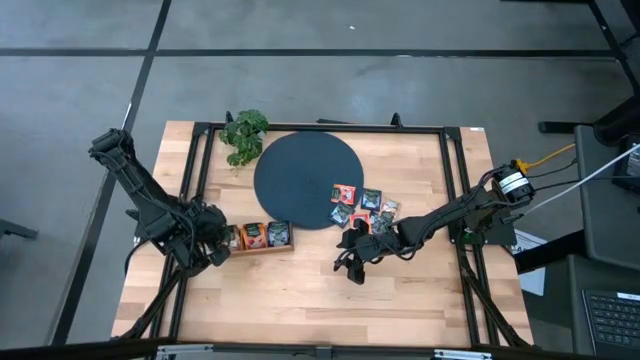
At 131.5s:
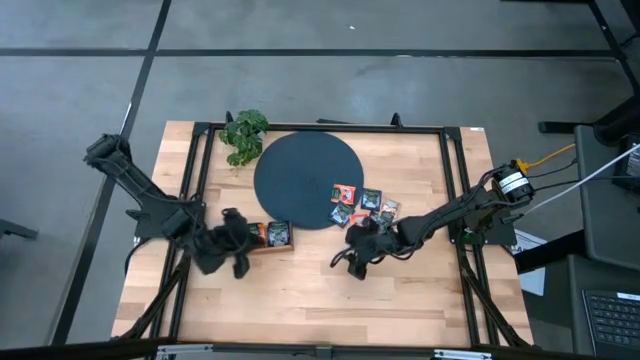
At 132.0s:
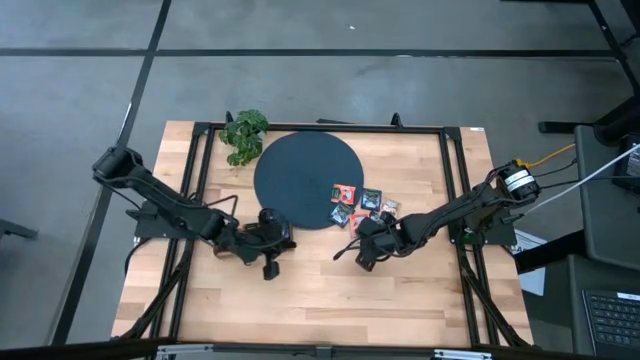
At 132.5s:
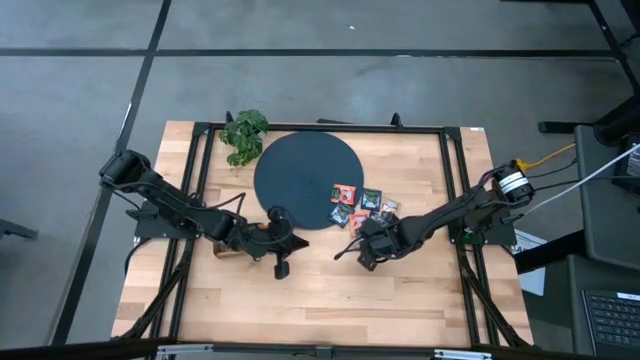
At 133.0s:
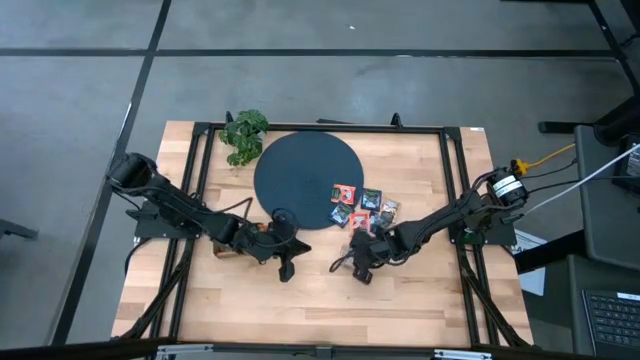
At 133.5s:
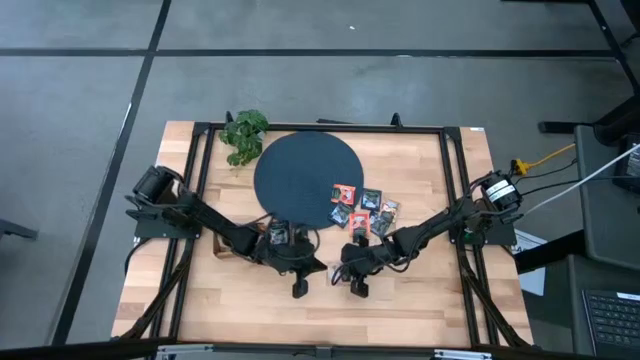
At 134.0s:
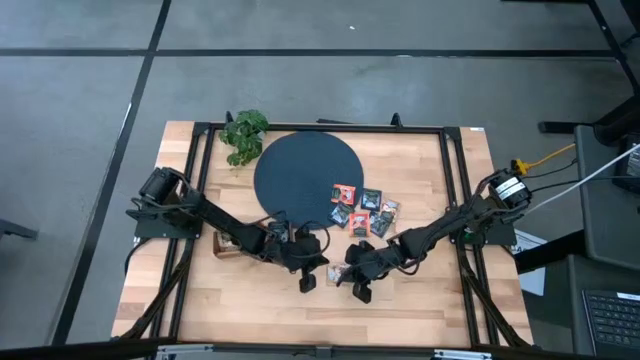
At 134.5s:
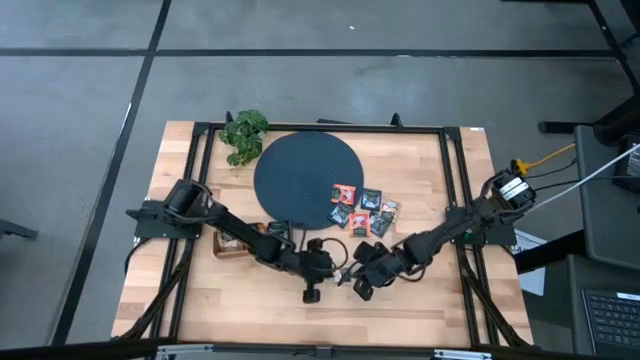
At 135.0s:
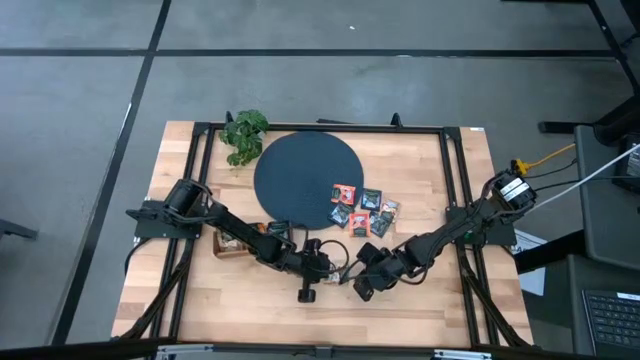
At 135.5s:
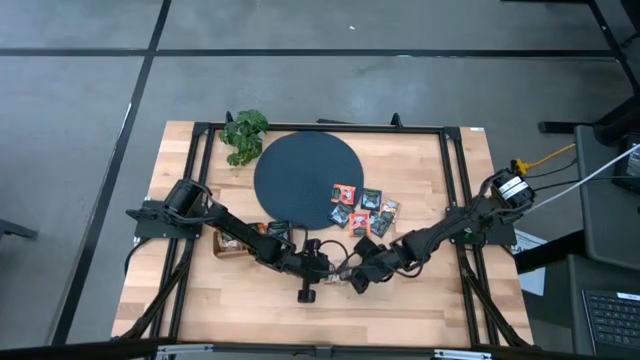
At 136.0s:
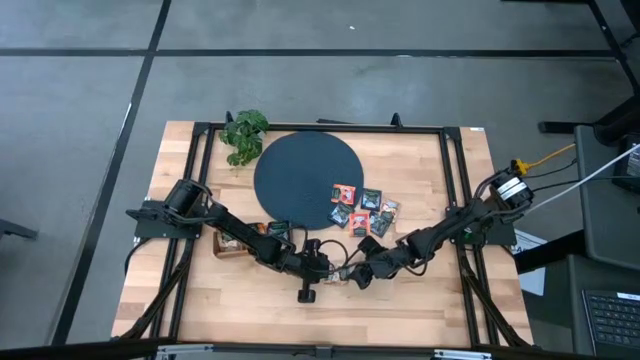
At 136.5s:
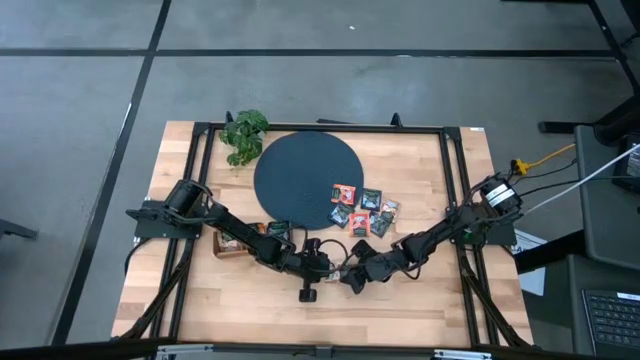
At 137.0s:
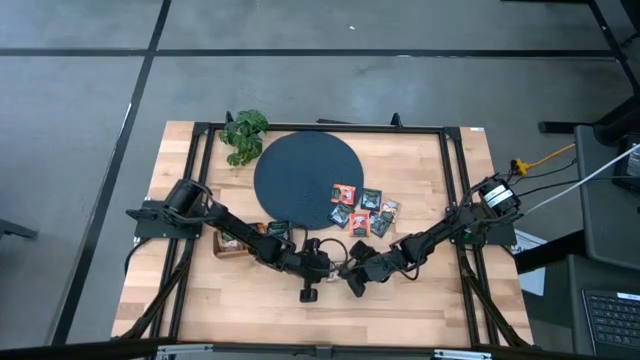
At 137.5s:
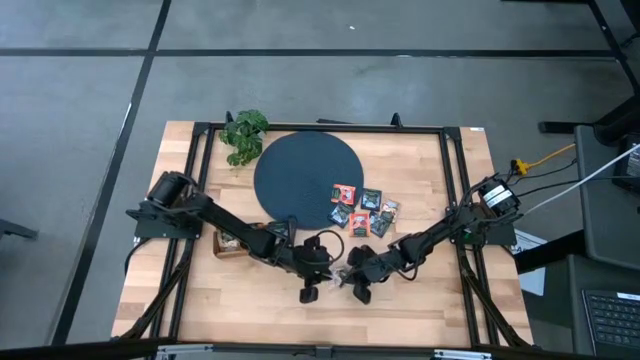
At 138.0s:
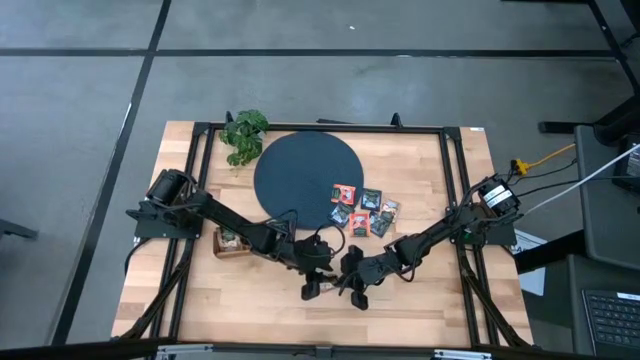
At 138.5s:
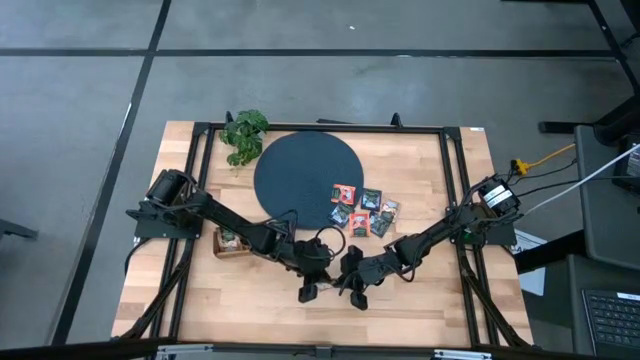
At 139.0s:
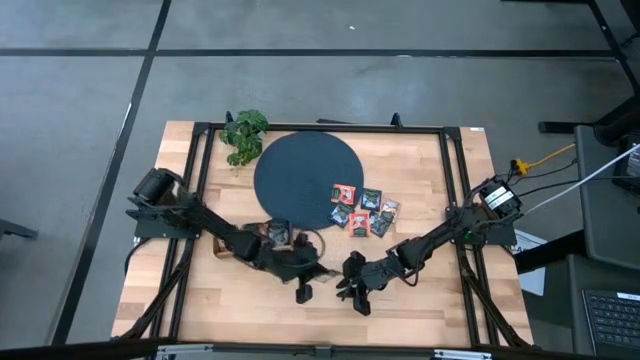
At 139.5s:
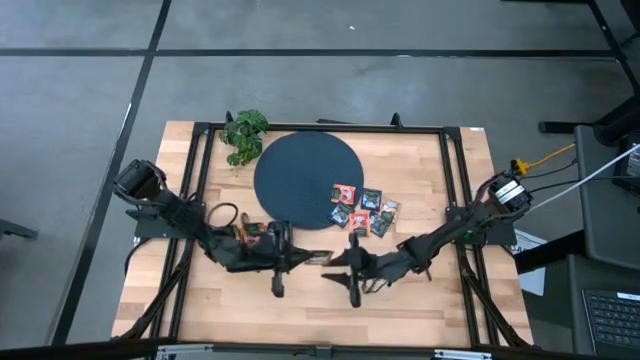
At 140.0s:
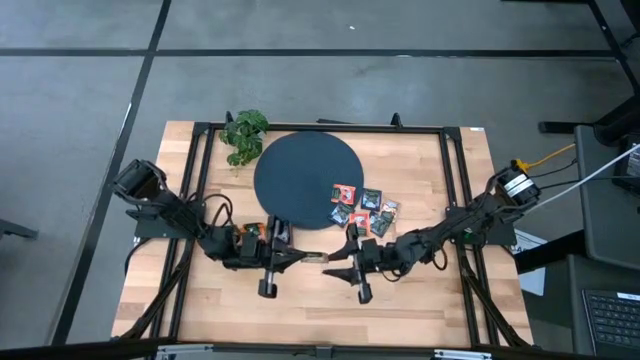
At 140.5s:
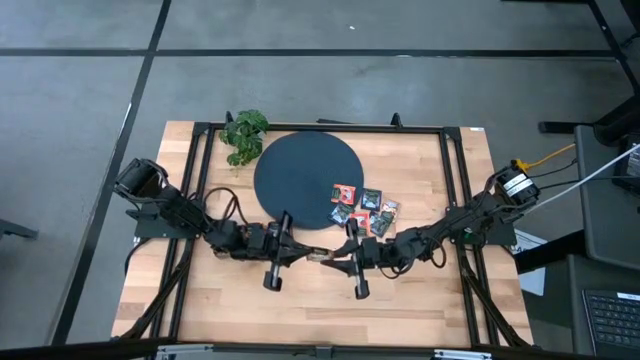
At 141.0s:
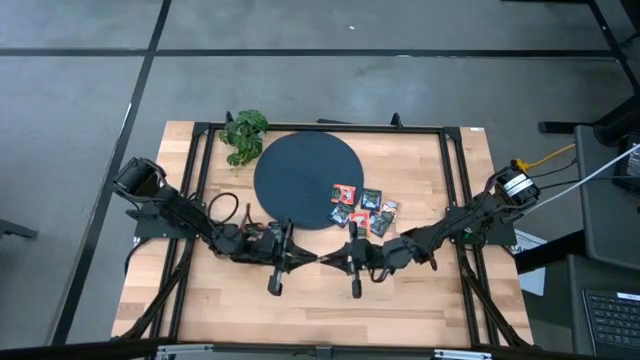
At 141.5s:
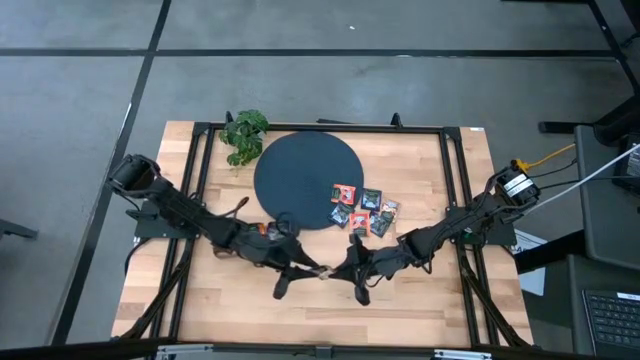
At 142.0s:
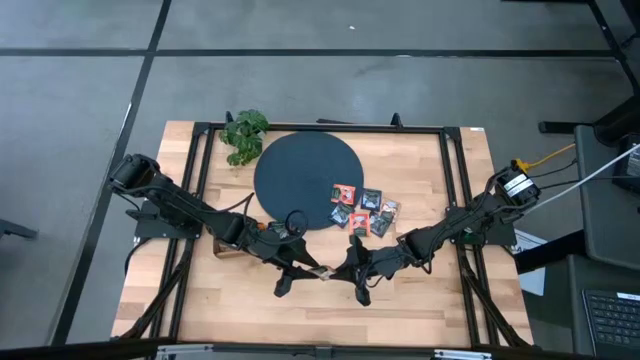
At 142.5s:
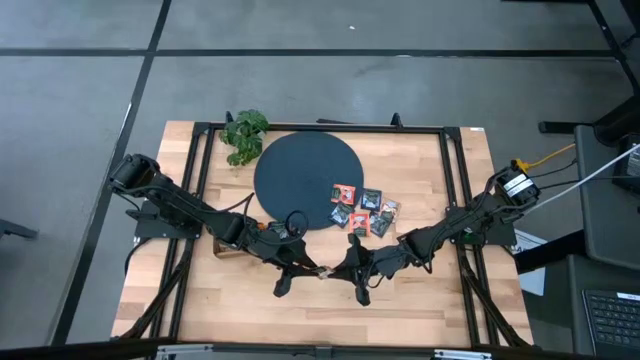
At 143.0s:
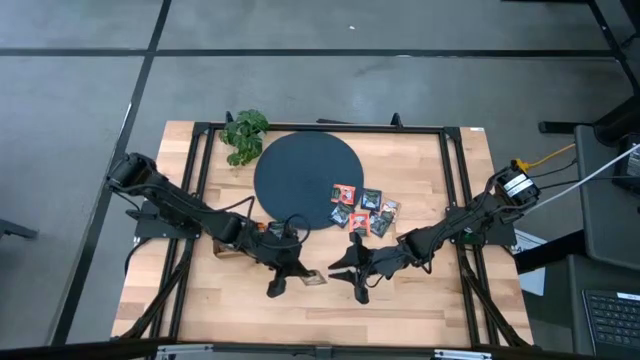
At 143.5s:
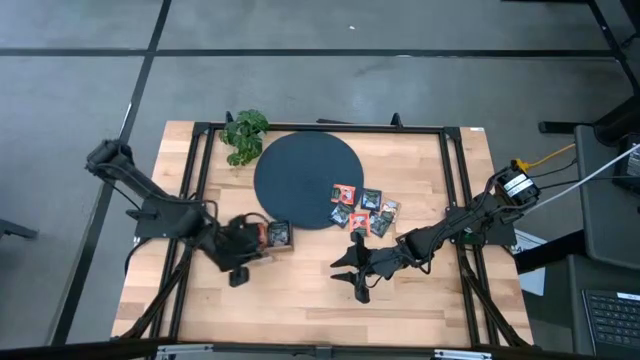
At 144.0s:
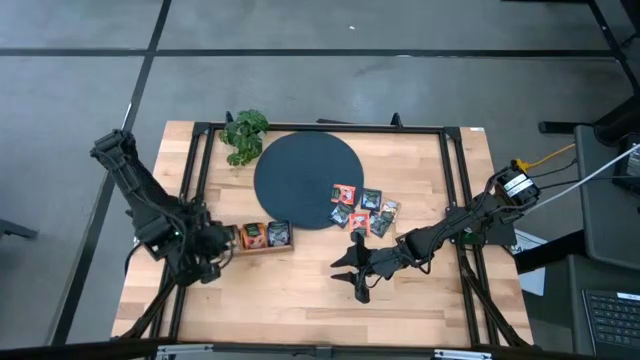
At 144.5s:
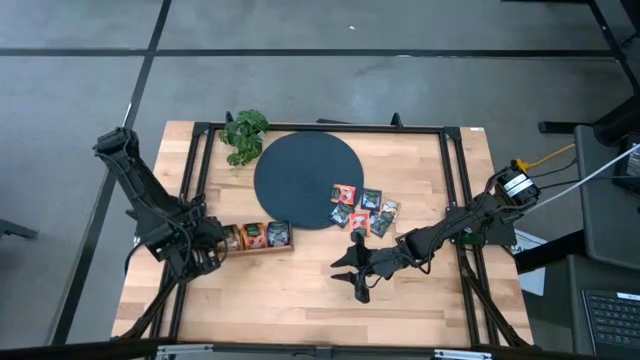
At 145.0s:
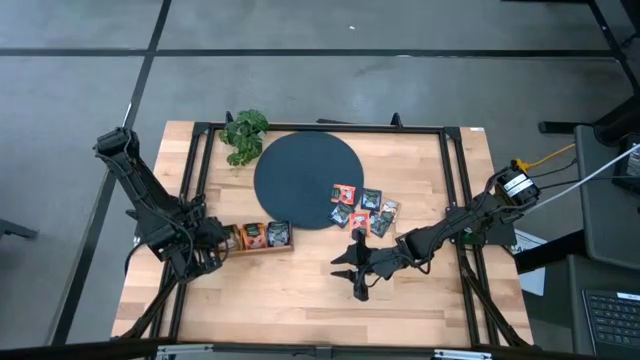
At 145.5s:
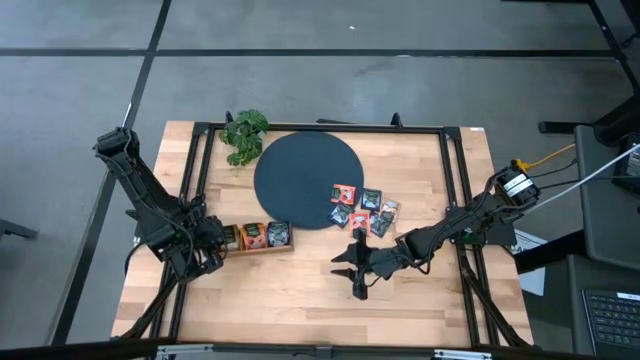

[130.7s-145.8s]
Task: Pick & Place Tea
Put the brown tea bag into the left section of the wooden organizer

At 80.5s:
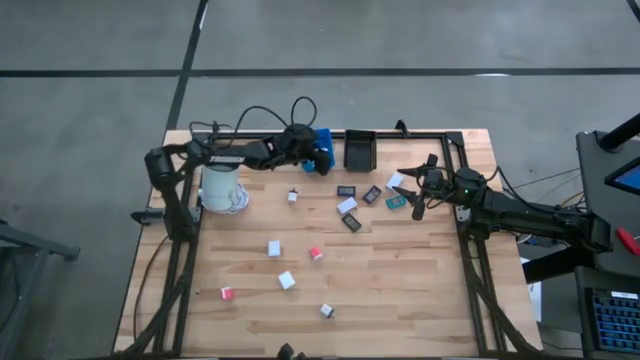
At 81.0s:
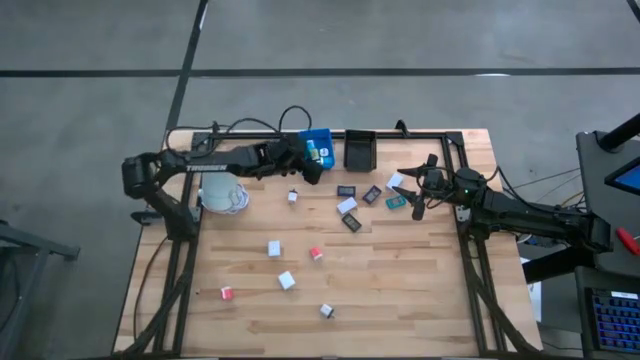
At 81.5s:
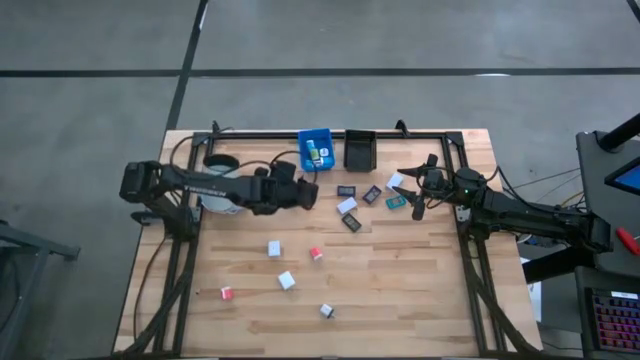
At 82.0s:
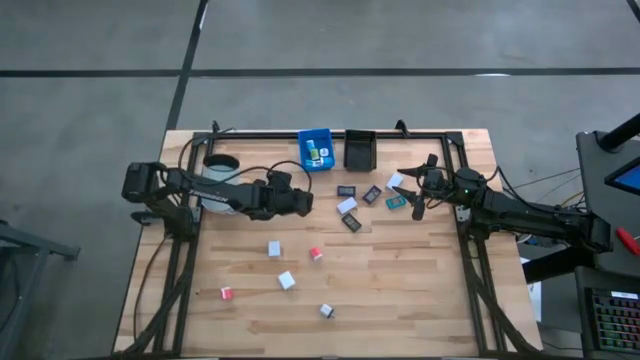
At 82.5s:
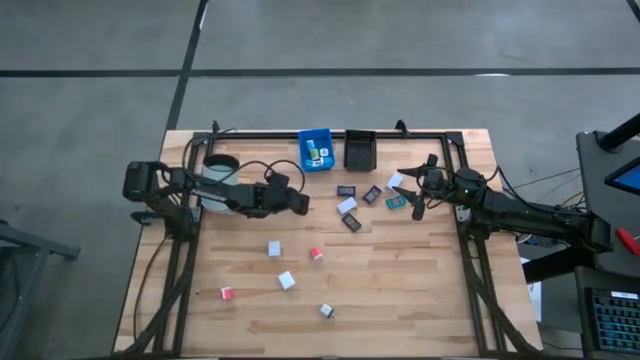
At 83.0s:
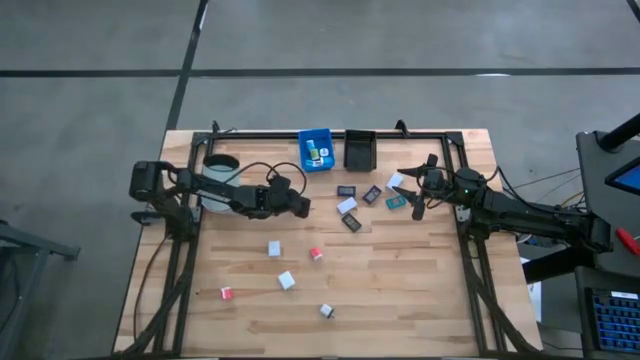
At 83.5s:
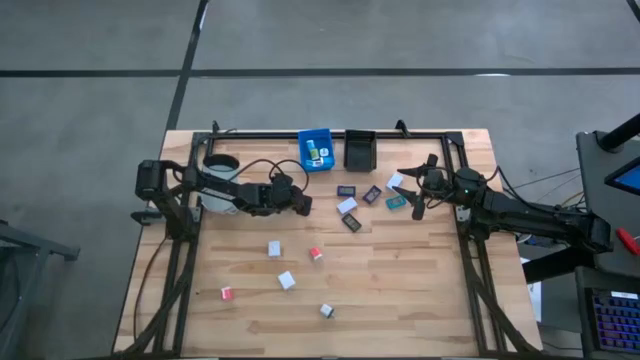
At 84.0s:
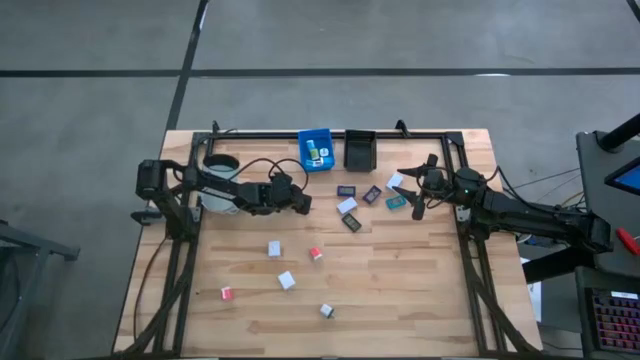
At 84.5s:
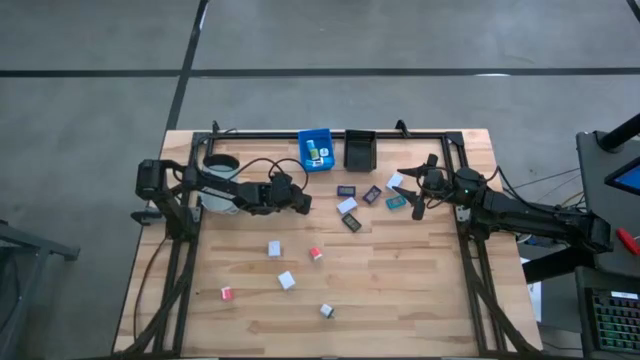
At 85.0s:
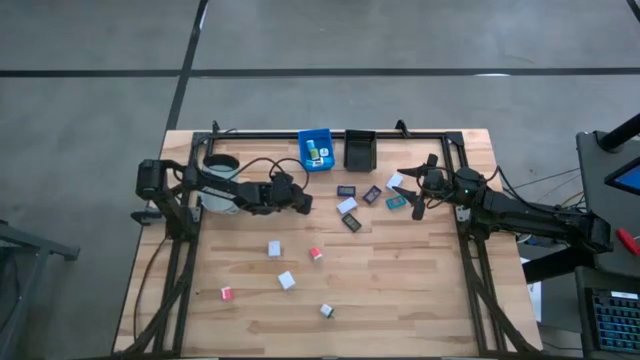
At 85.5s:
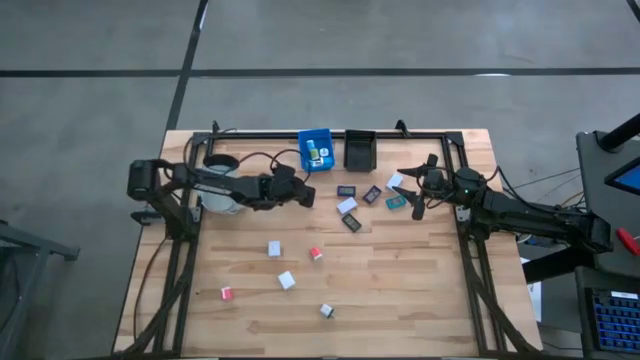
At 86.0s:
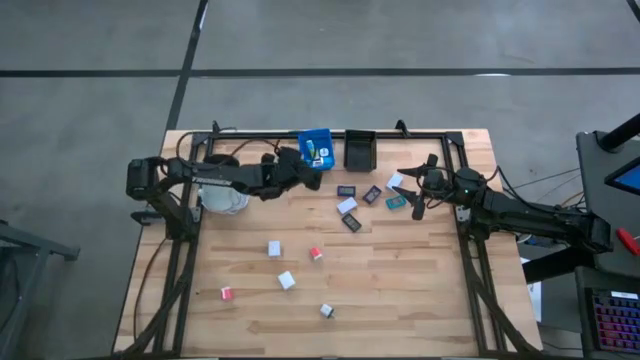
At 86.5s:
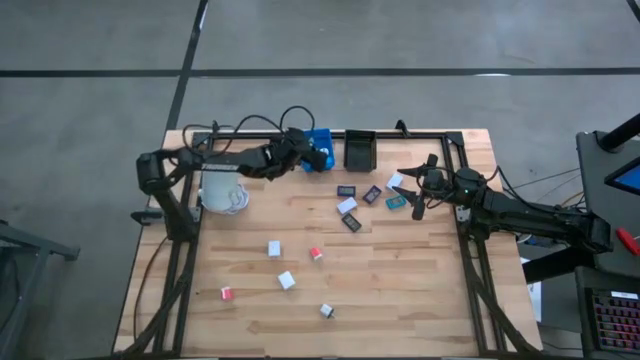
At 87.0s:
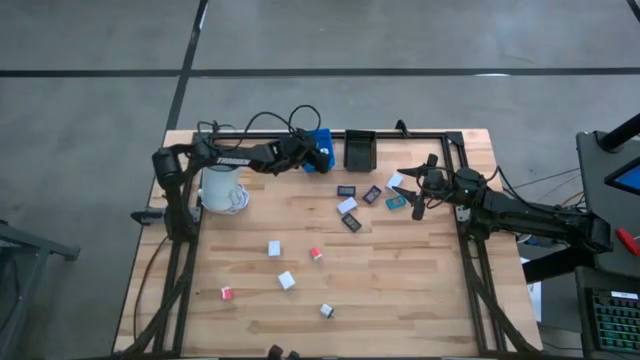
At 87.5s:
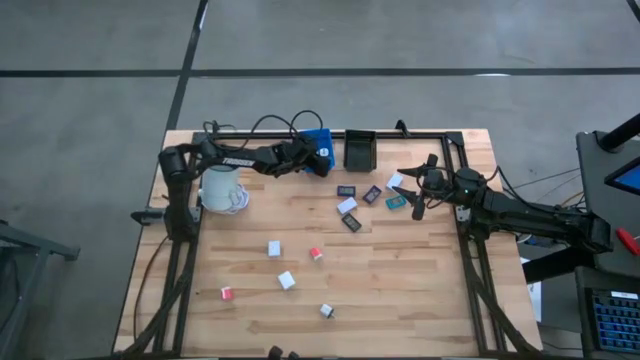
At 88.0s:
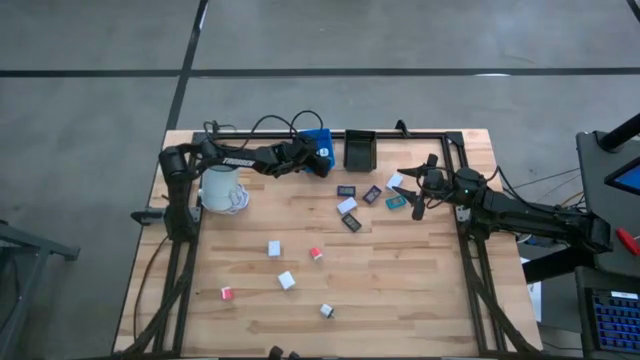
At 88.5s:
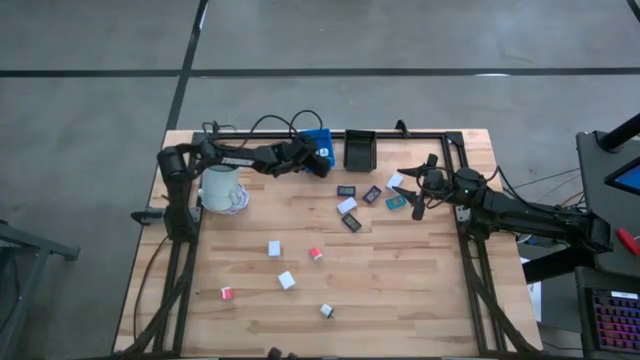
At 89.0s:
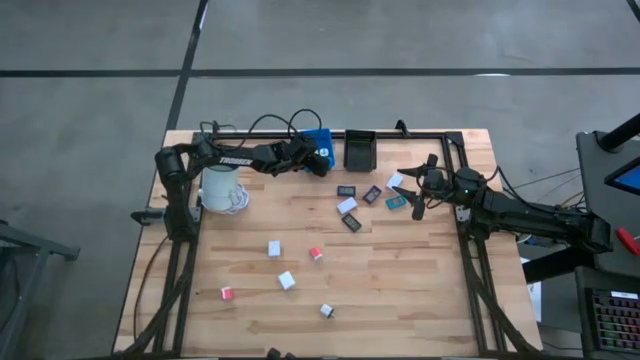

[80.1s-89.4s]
Task: Pick & Place Office items
Put the top small white adapter into the blue basket
